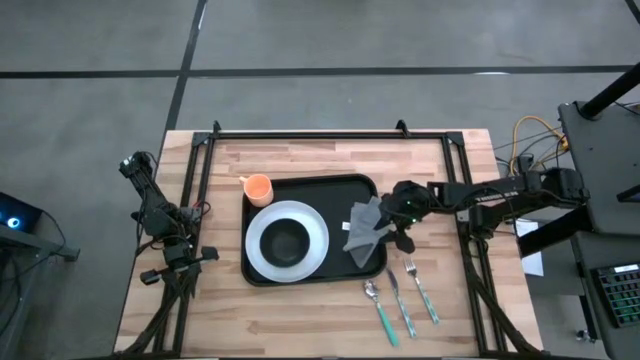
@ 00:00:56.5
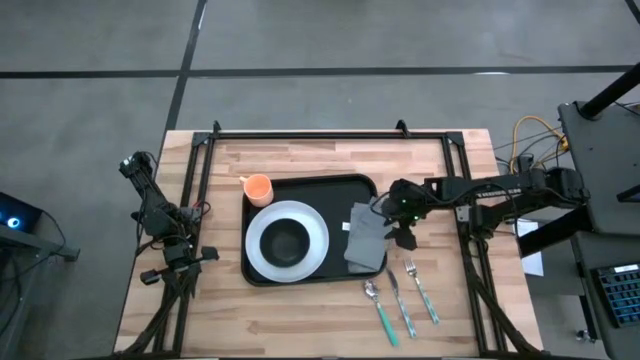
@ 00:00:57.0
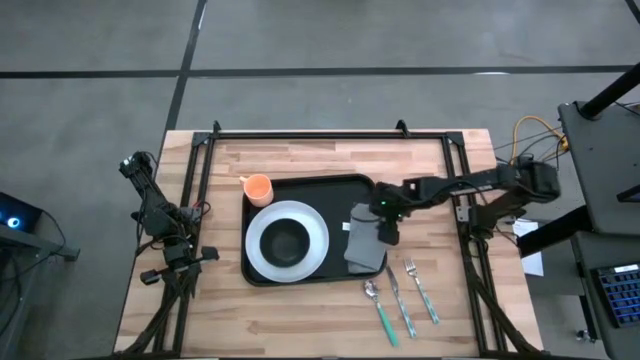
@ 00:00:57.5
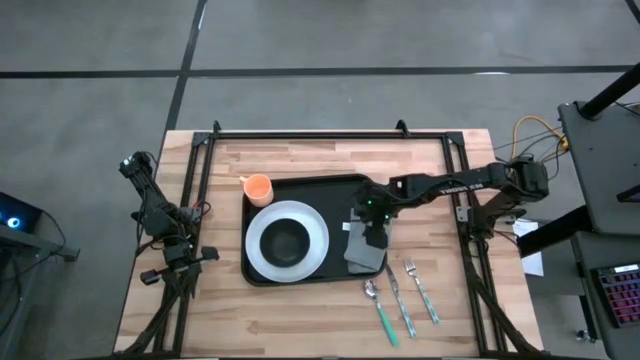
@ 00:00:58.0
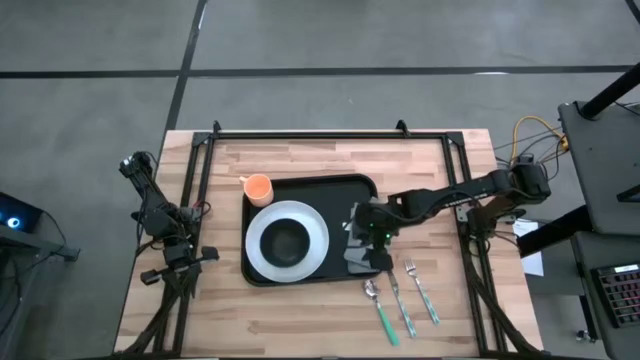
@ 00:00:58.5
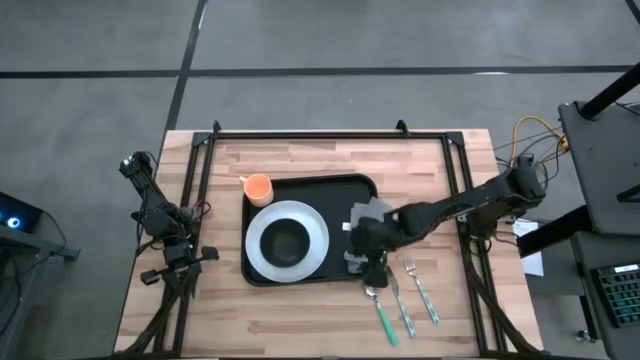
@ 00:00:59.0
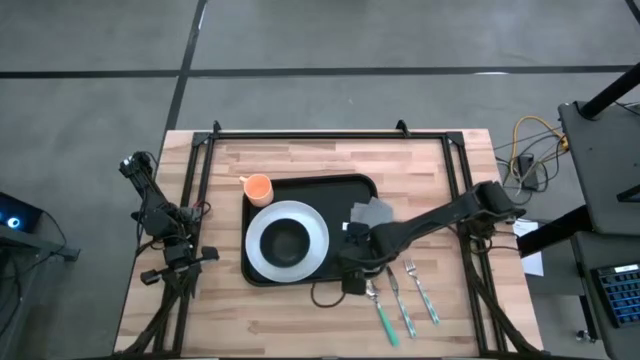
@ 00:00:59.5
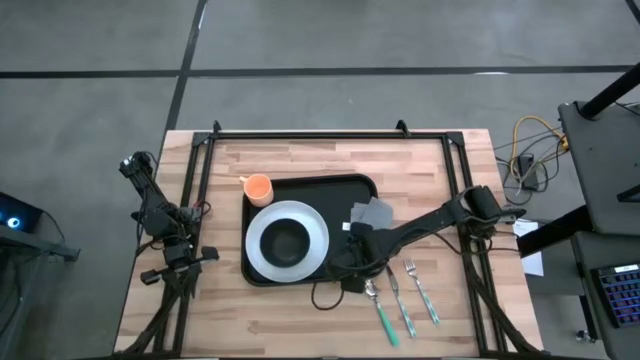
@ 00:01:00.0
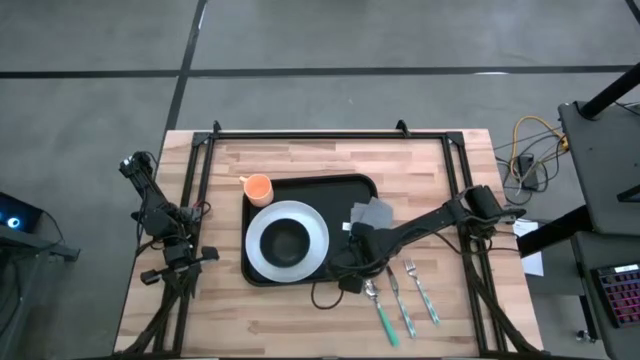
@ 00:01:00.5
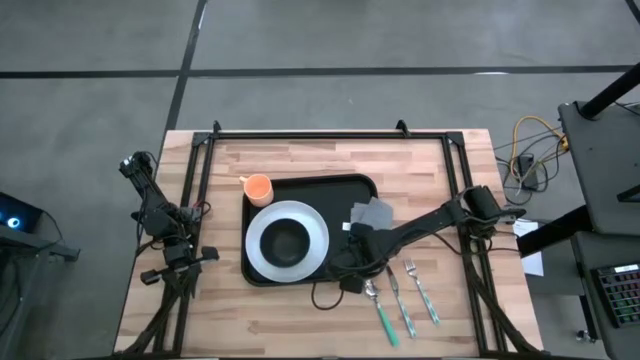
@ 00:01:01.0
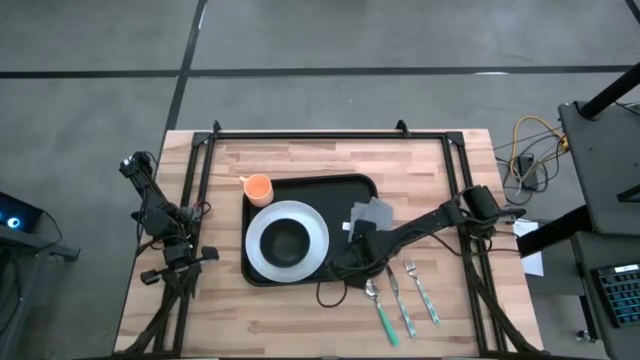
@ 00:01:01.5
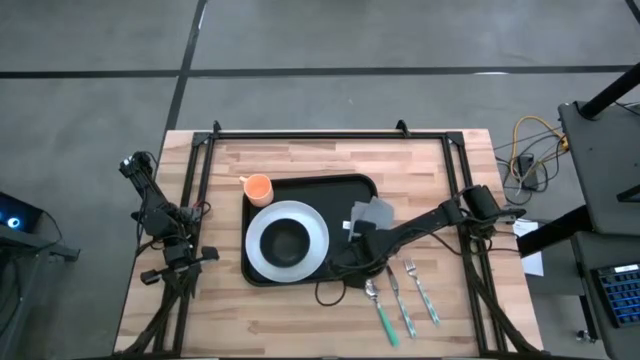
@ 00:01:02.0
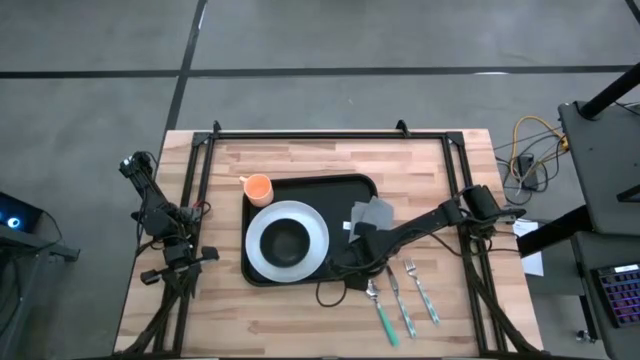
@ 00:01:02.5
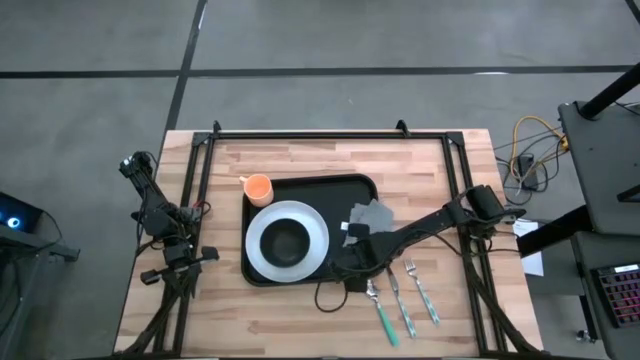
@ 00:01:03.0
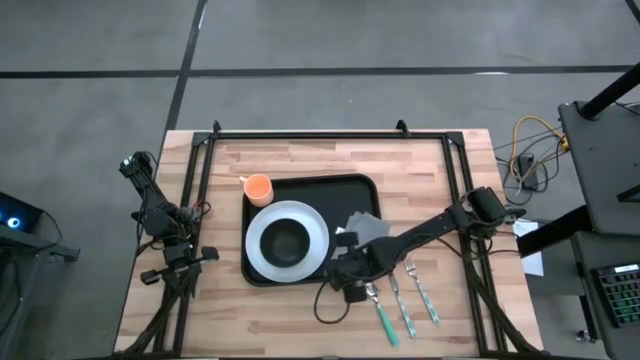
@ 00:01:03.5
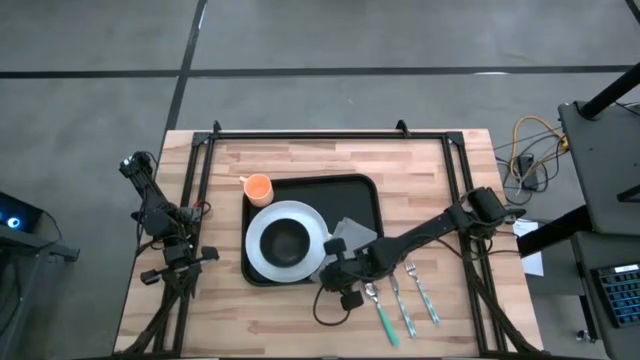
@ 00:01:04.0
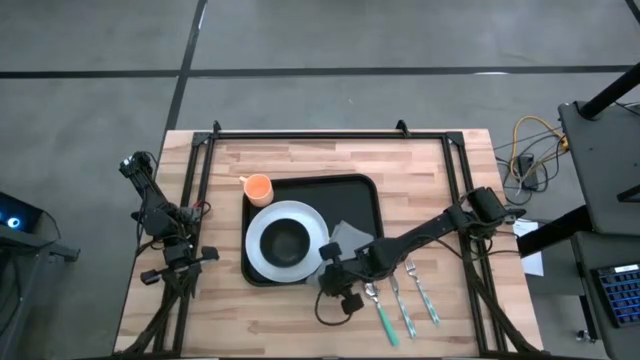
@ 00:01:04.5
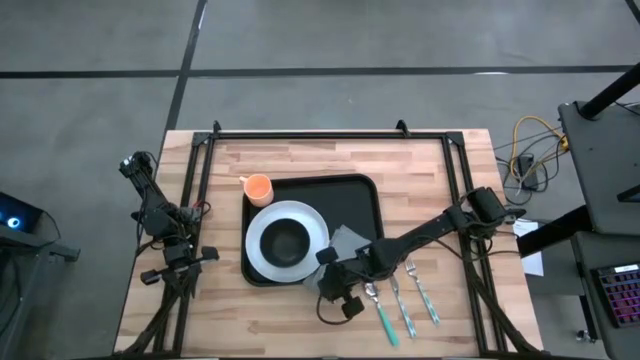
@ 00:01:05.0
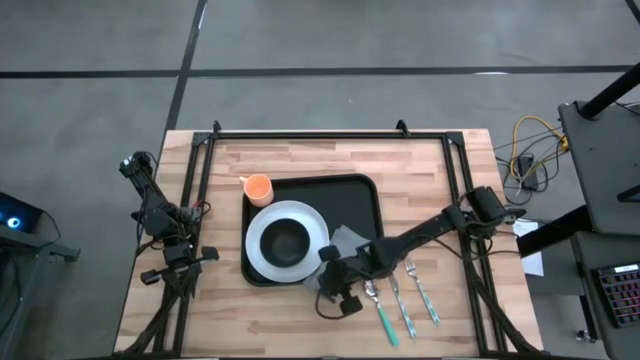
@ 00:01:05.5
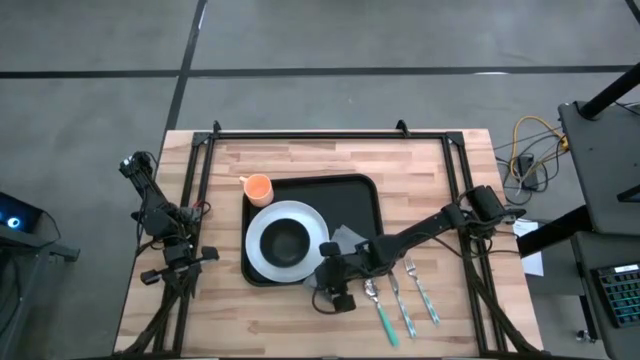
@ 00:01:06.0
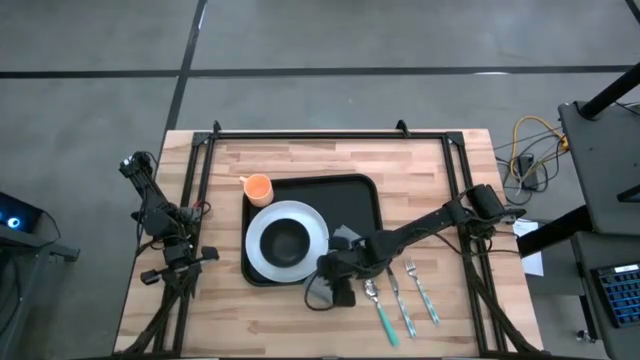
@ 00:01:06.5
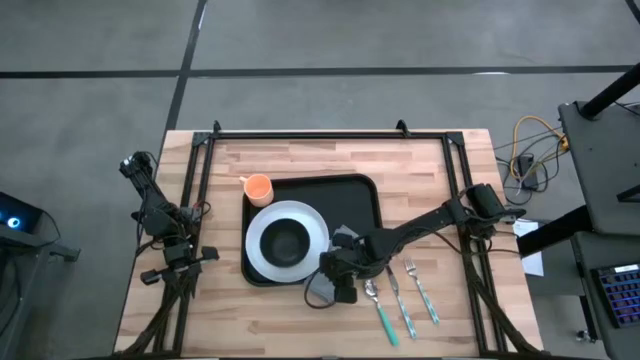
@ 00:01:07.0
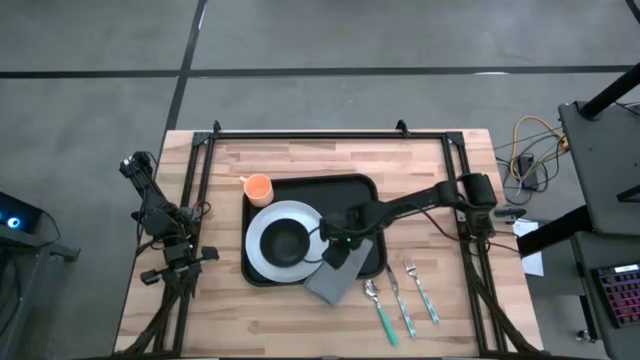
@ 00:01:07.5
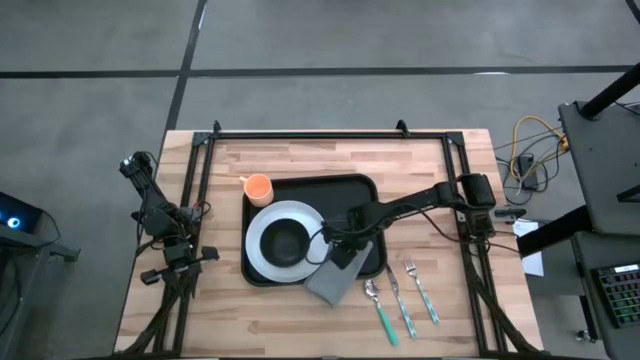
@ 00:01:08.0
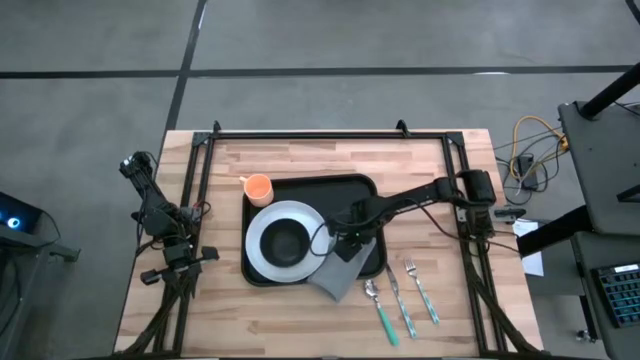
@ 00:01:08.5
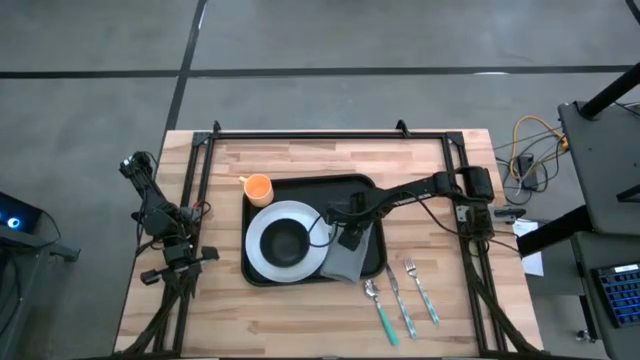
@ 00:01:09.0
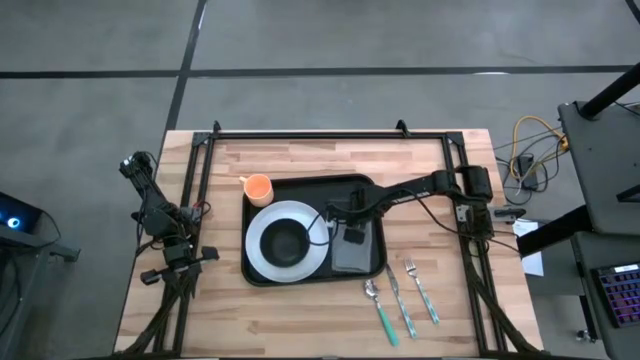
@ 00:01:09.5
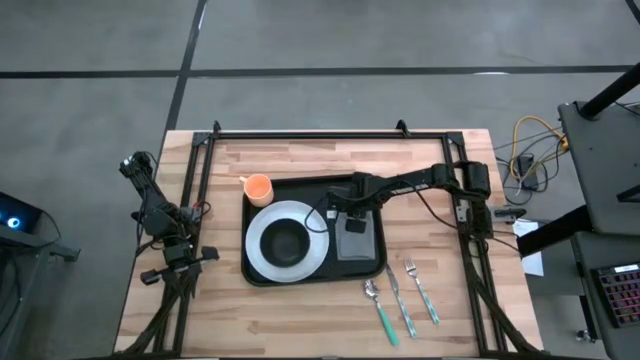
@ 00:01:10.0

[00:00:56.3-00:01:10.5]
Task: Set up tray
Put the gray table napkin on the black tray to the right of the white plate

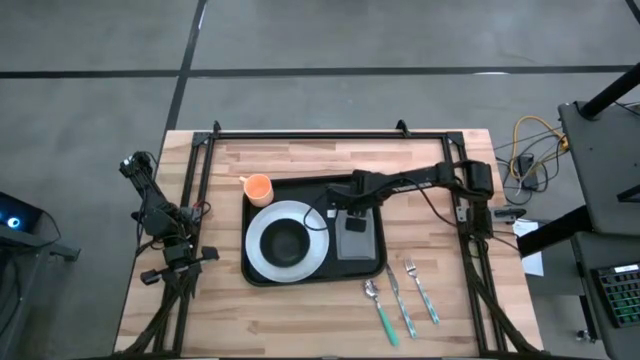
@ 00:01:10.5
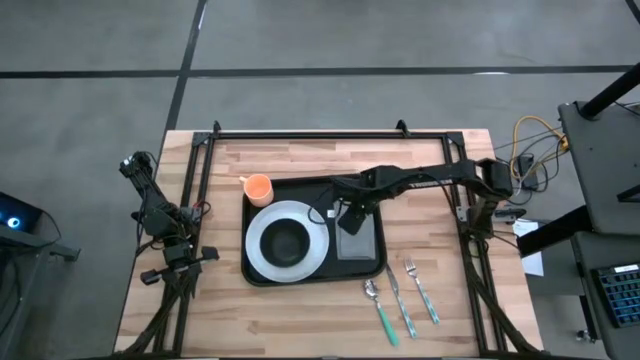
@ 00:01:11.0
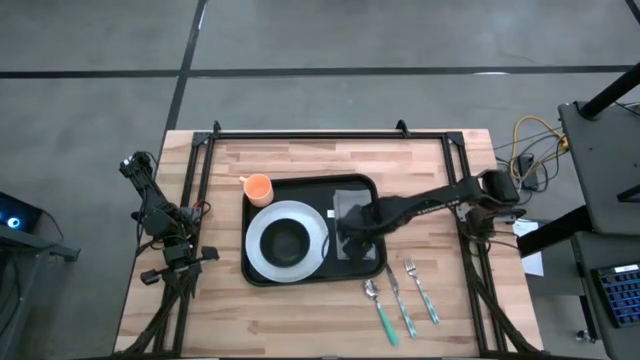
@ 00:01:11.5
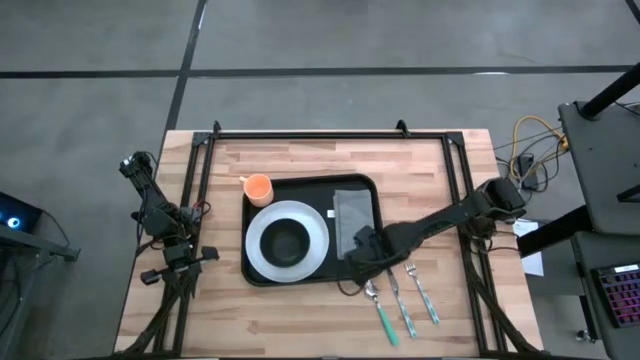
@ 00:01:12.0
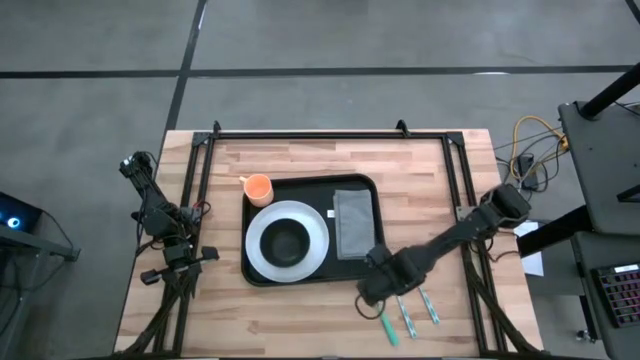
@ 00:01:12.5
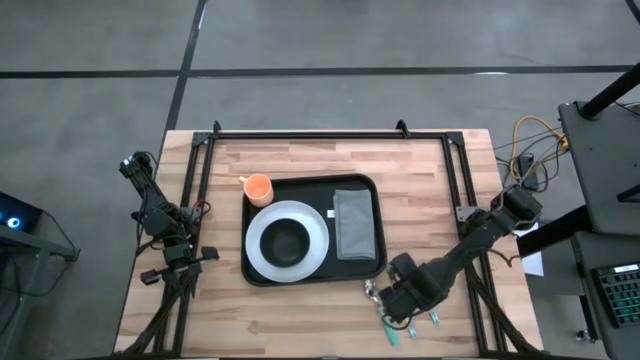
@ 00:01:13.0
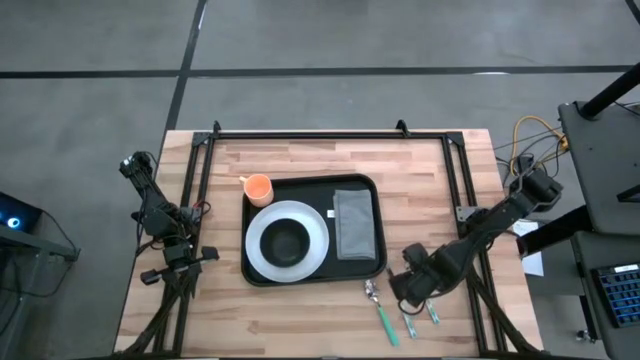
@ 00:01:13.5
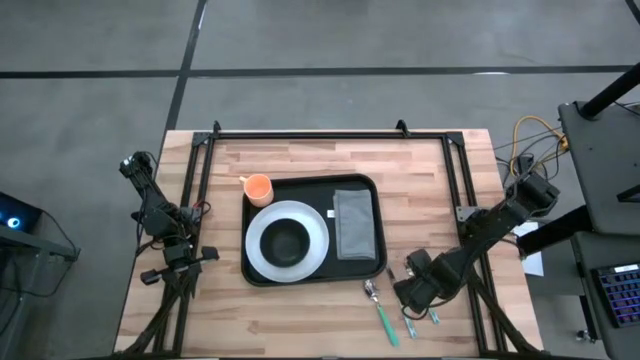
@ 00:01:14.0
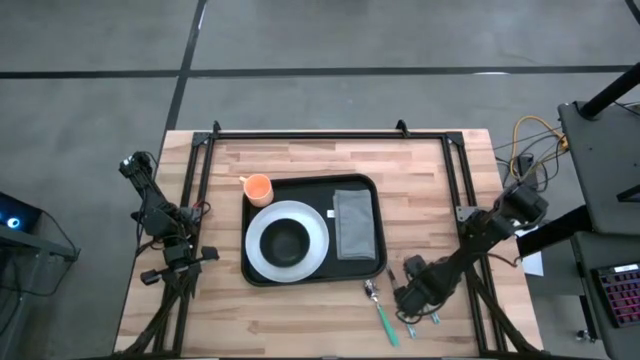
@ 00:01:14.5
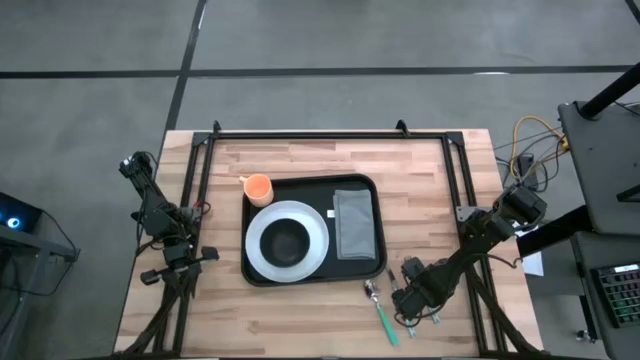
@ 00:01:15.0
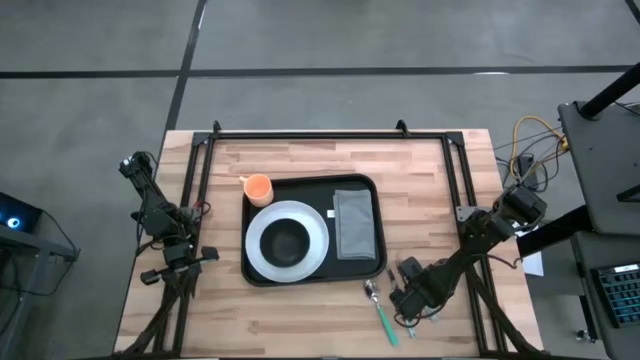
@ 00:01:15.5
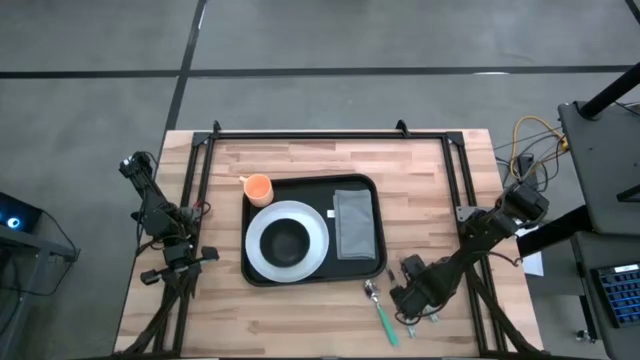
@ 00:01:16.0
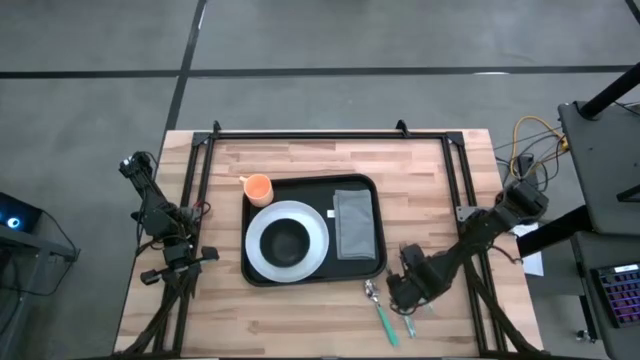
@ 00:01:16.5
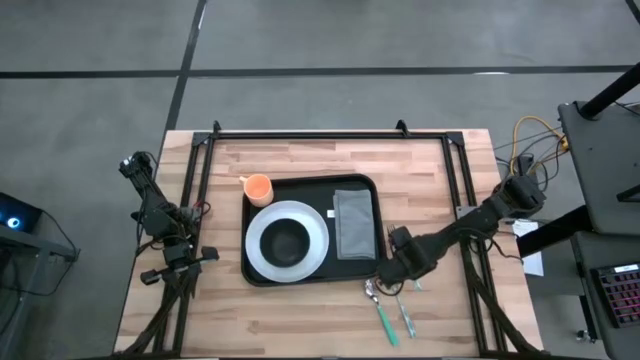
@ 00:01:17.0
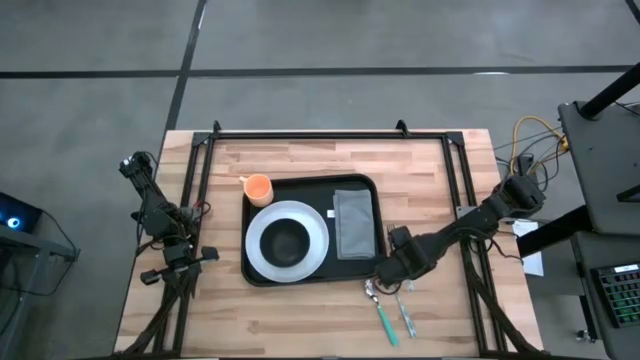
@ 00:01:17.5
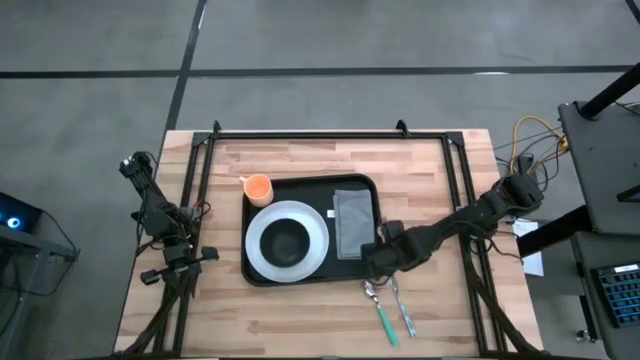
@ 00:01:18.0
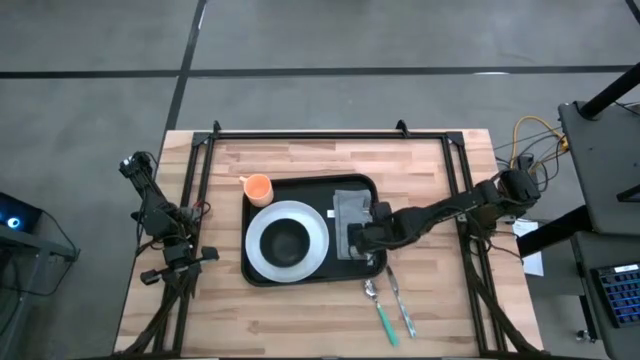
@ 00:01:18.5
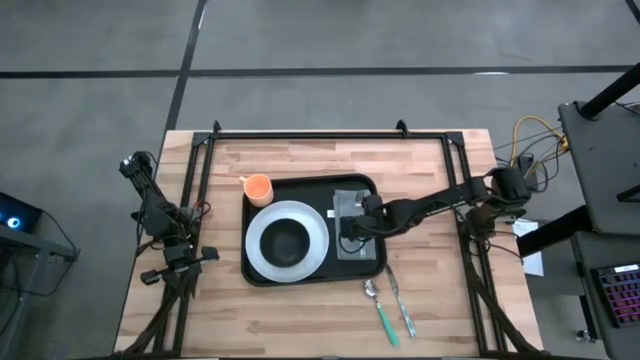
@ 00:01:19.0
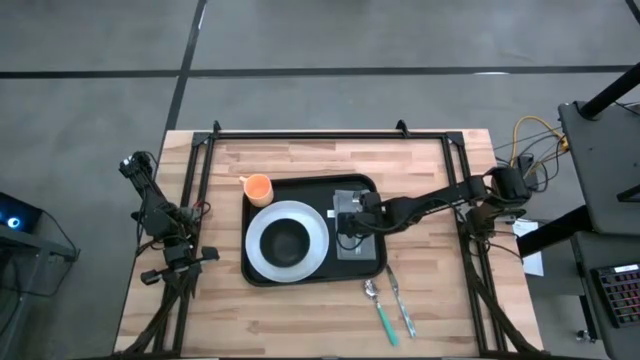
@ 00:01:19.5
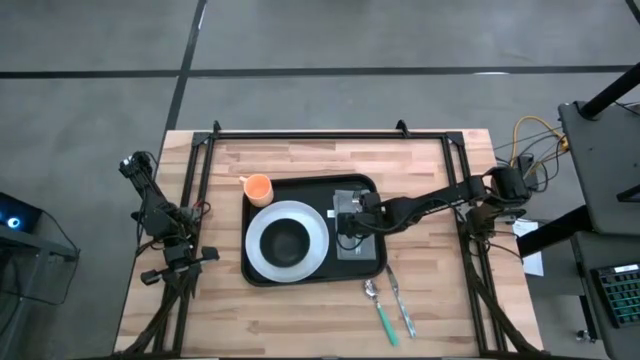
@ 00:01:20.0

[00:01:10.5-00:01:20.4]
Put the green fork on the gray table napkin
